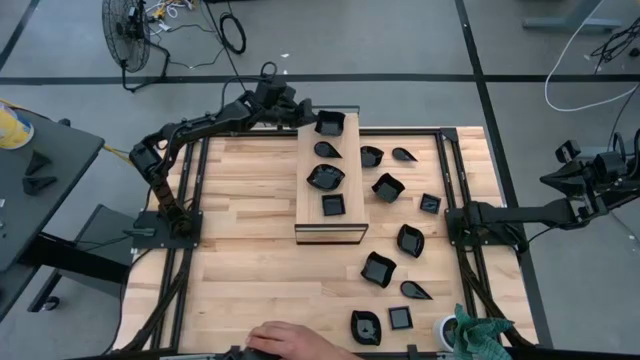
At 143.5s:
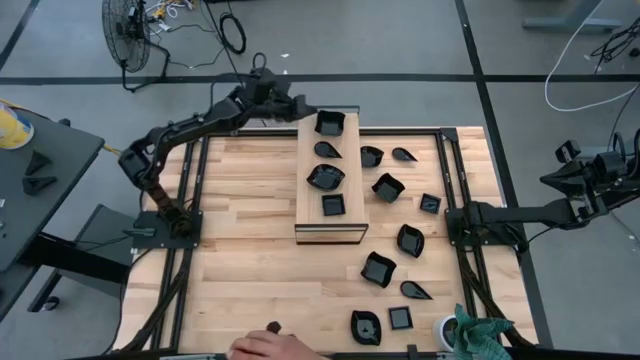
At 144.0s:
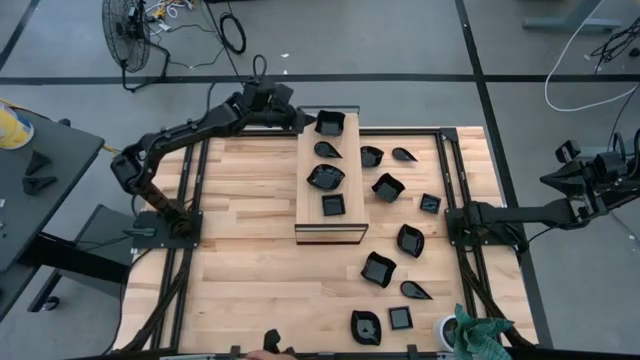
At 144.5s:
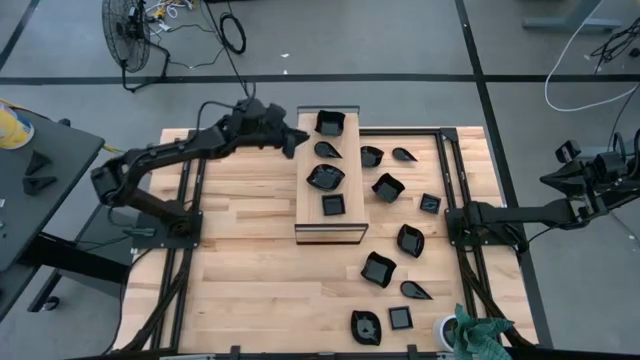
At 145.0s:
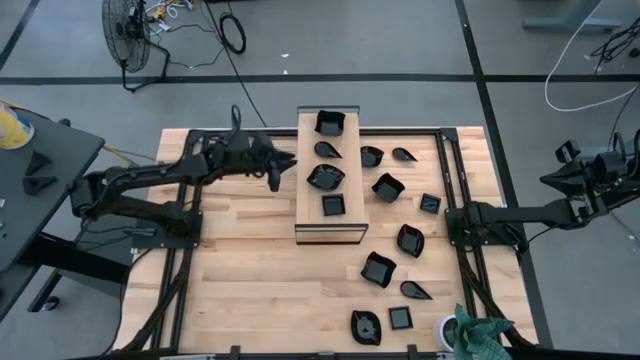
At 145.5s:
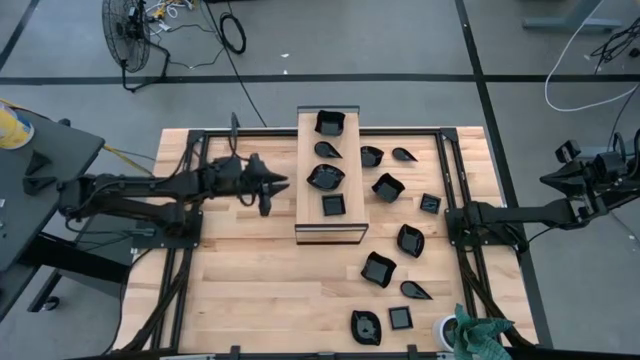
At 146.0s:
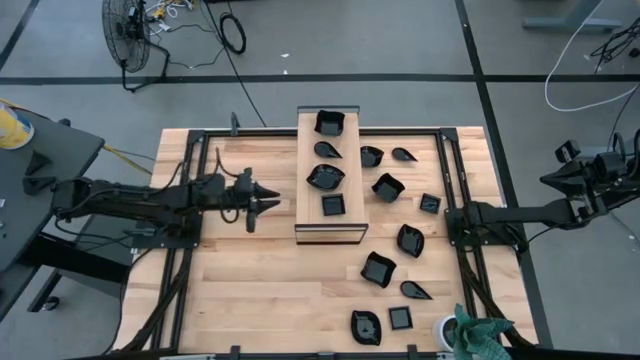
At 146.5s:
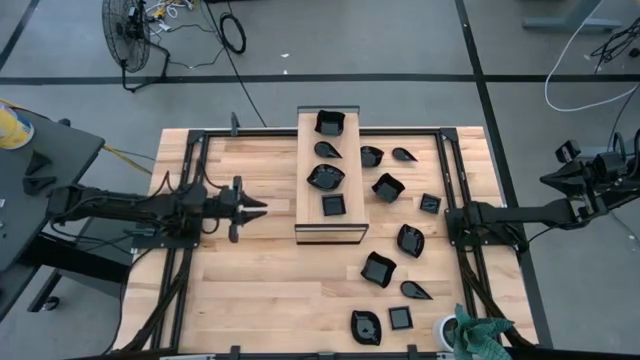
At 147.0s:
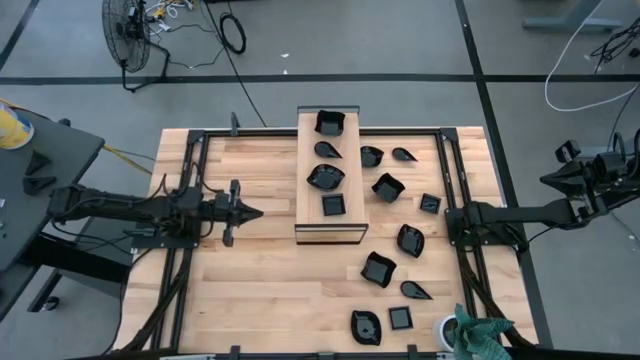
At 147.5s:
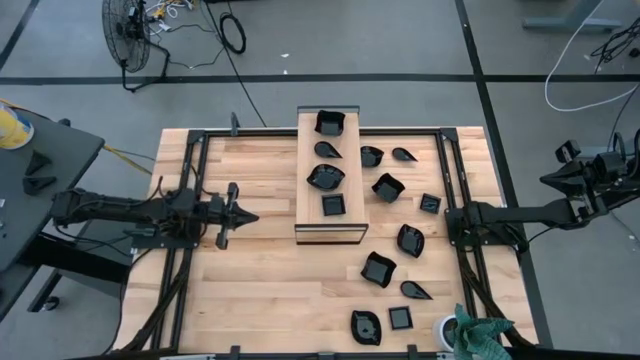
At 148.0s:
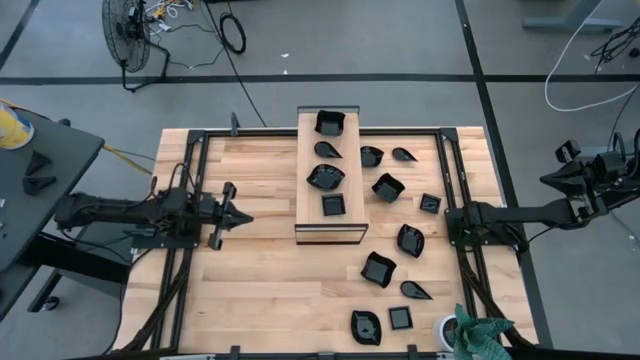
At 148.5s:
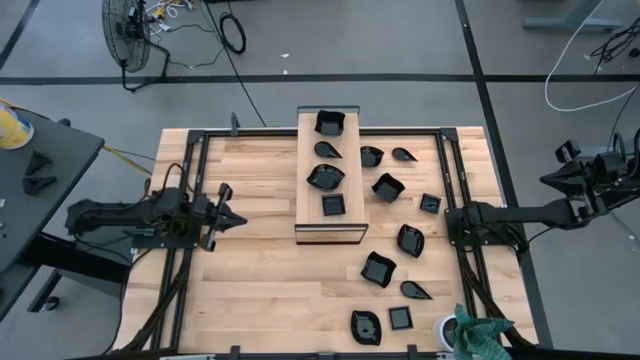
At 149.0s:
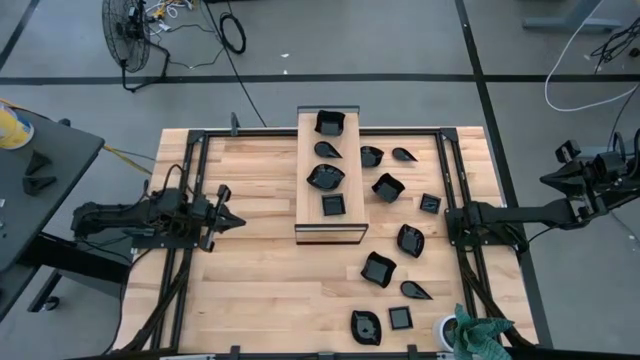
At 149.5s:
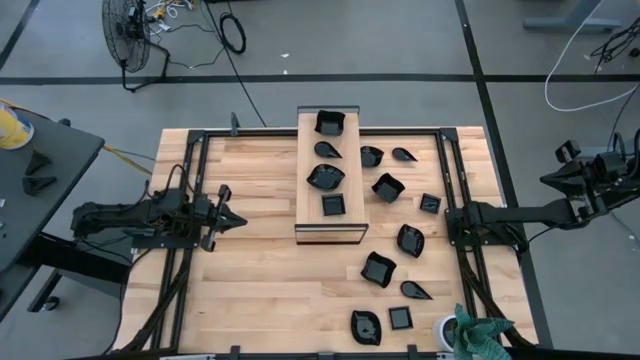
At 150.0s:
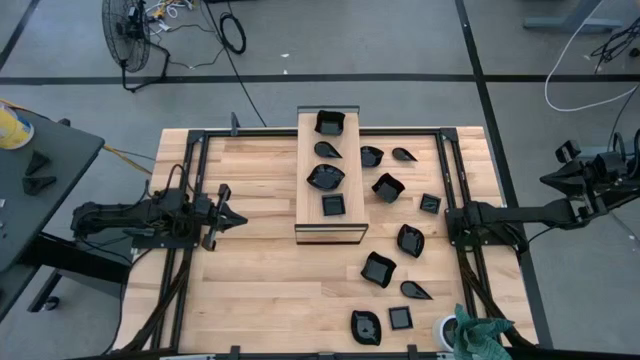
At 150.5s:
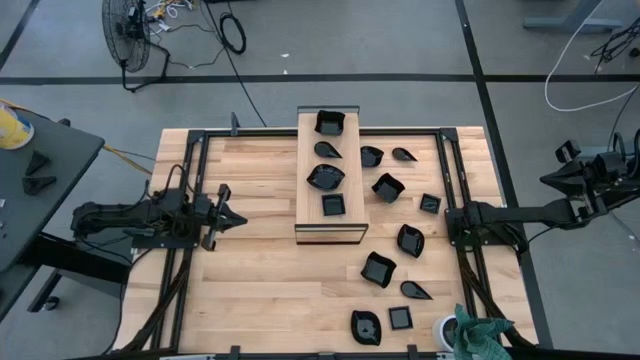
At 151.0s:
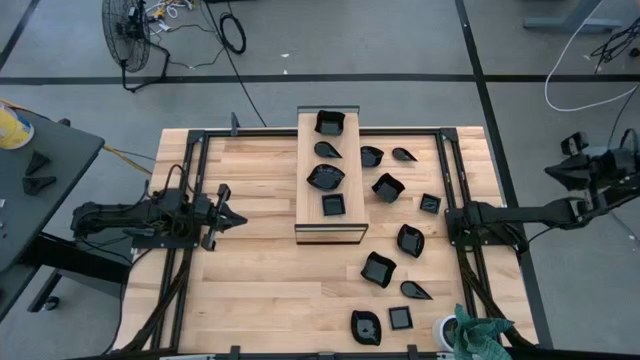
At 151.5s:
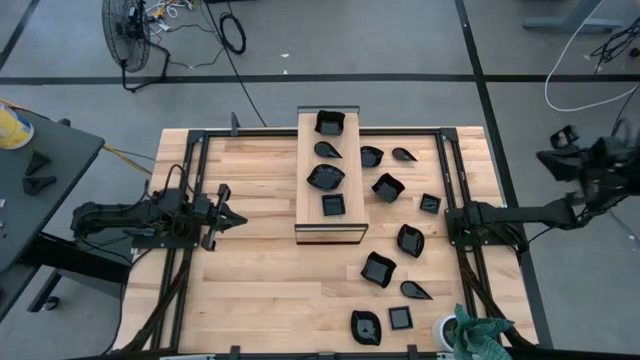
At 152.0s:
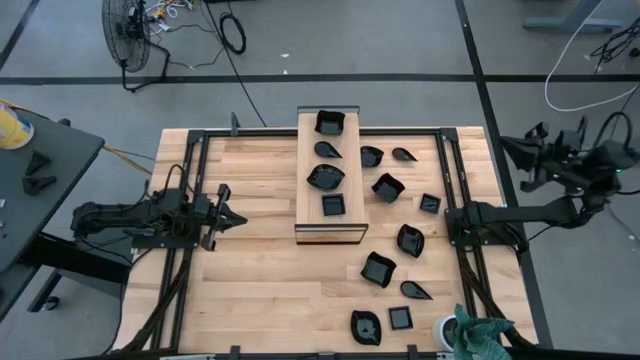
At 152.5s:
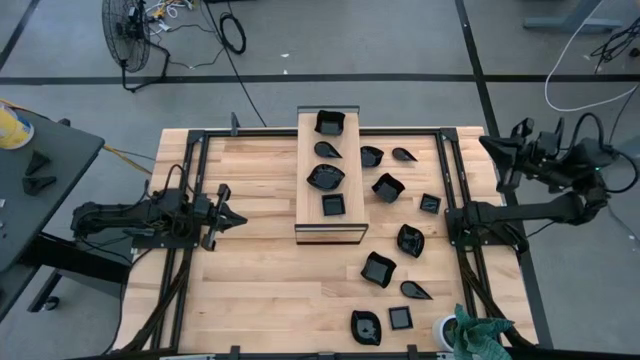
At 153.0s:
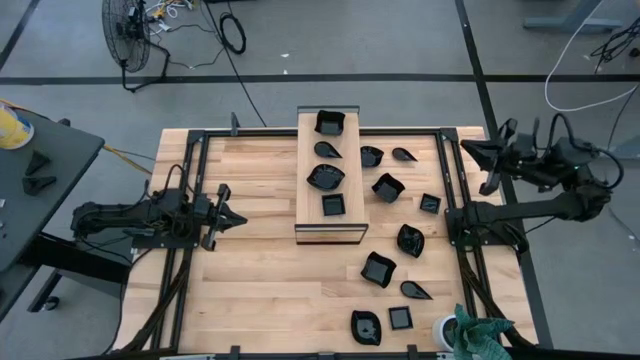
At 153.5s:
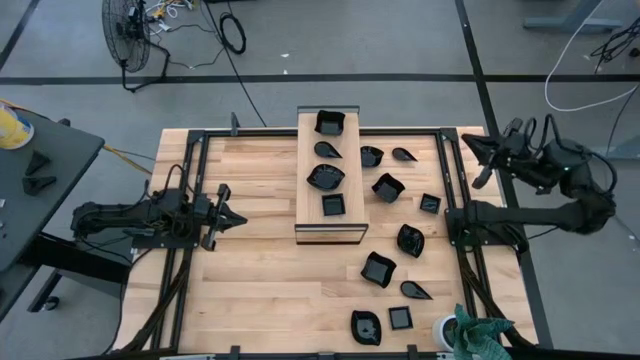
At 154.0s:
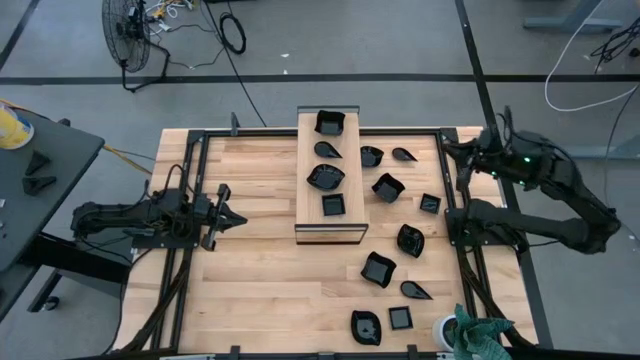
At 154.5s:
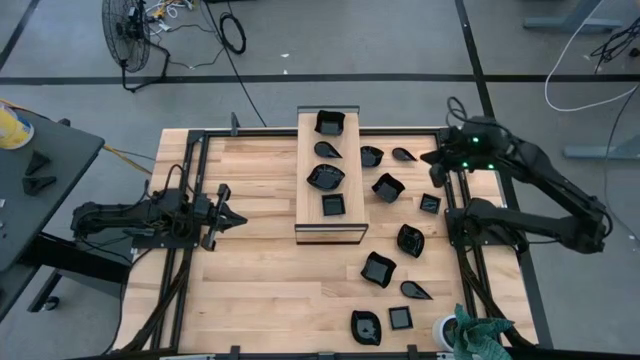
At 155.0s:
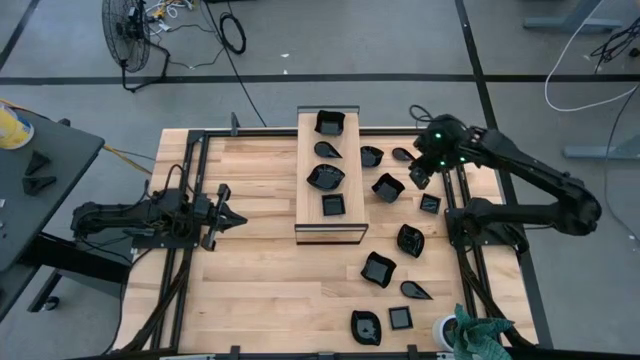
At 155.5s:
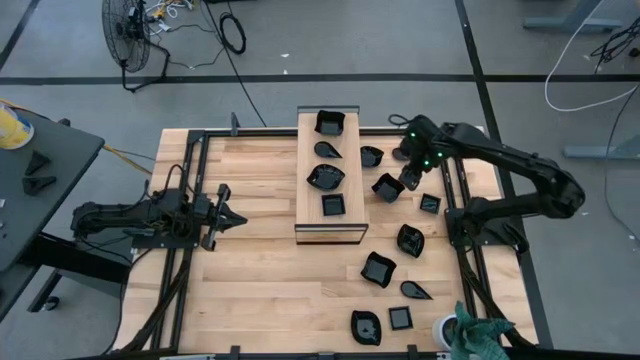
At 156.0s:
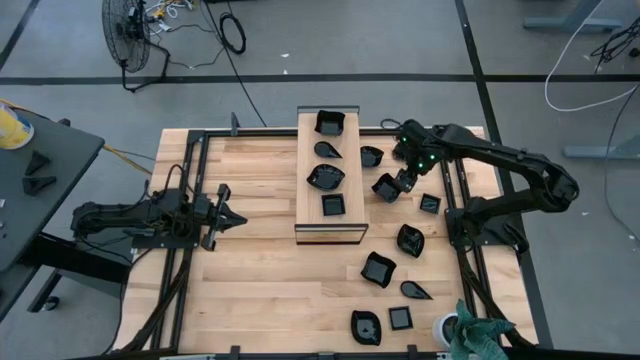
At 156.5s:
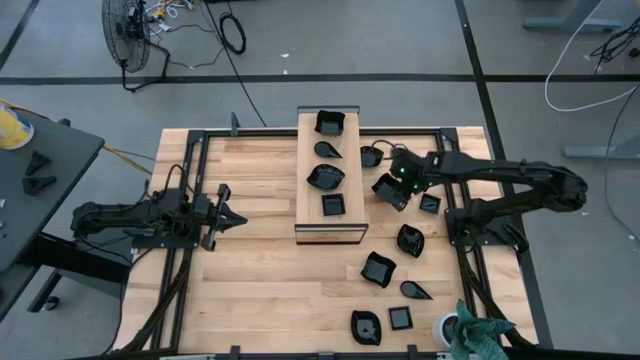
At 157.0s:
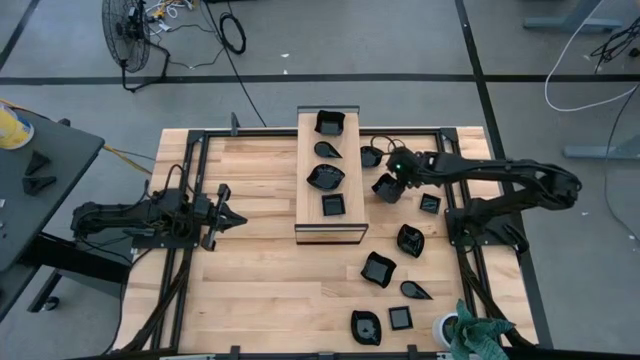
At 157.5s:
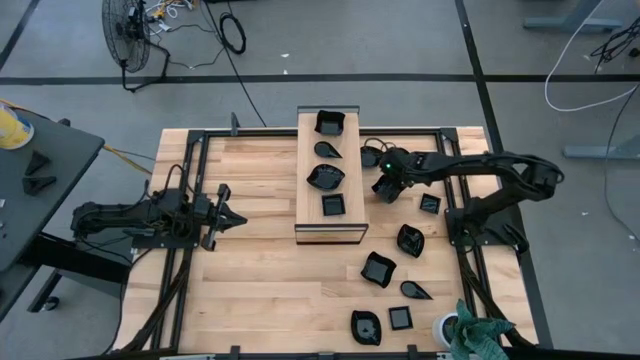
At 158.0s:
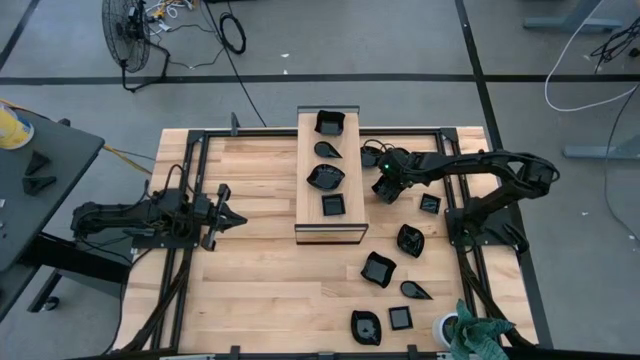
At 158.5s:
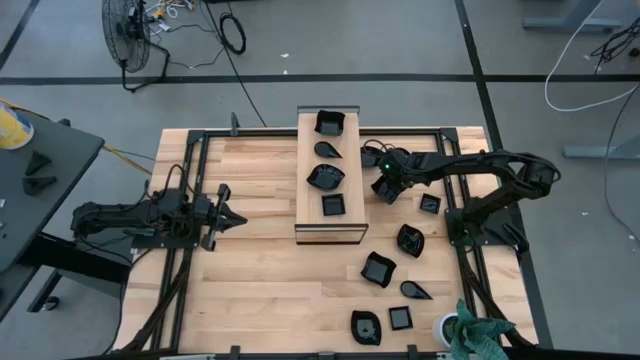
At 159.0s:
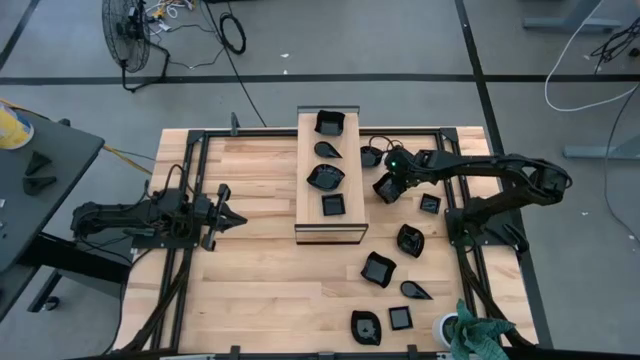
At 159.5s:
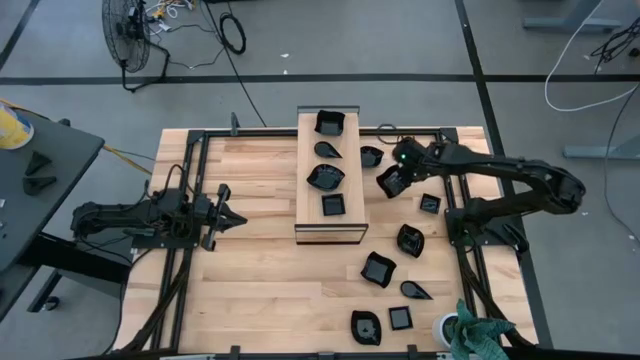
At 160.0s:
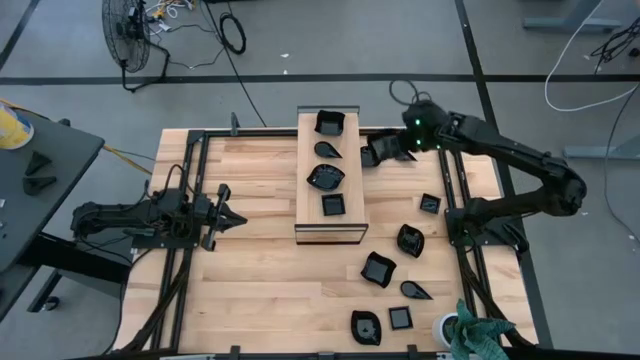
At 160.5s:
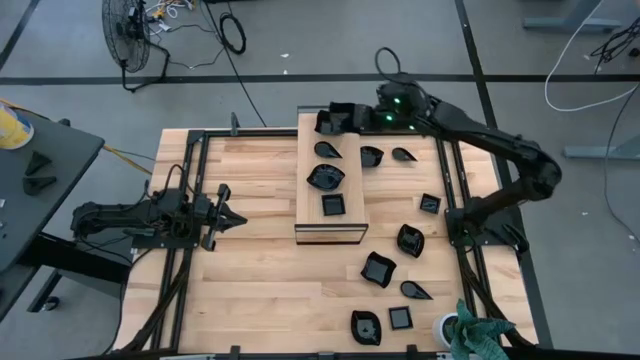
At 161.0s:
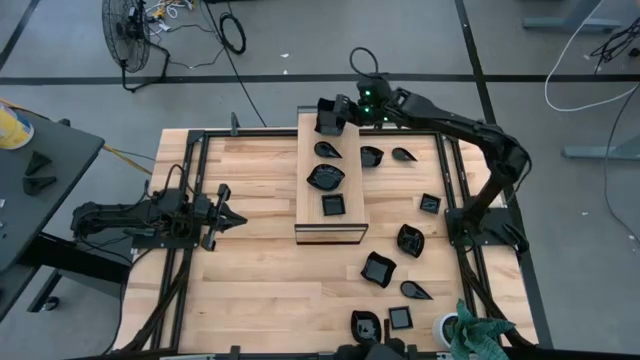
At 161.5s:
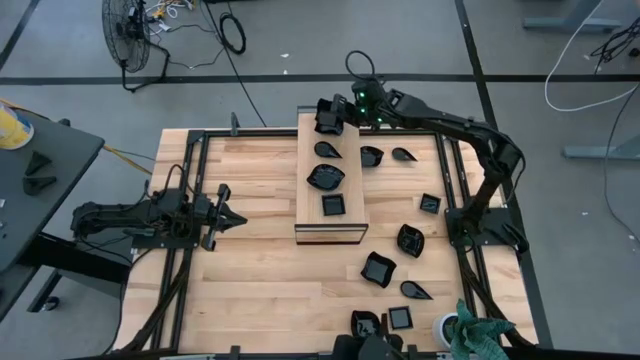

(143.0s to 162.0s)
Task: Pick & Place Mini shaped plates
Stack the distorted square plate on top of the distorted square plate on the shelf

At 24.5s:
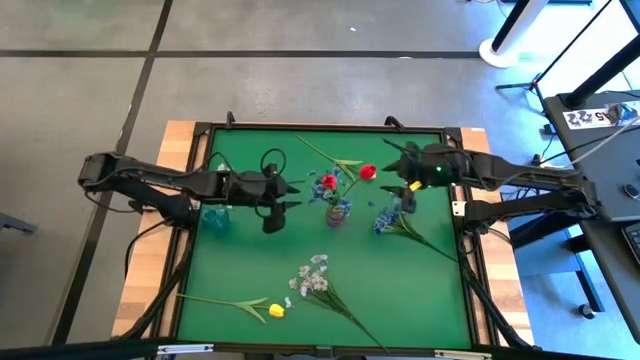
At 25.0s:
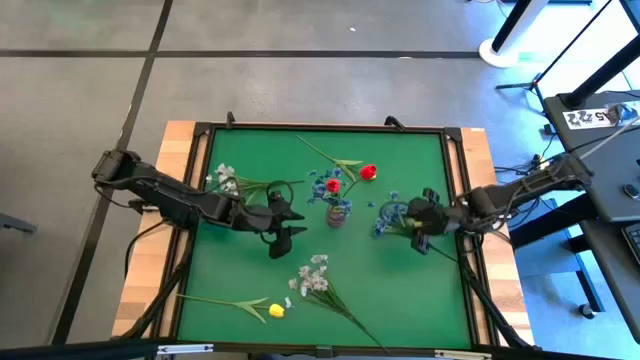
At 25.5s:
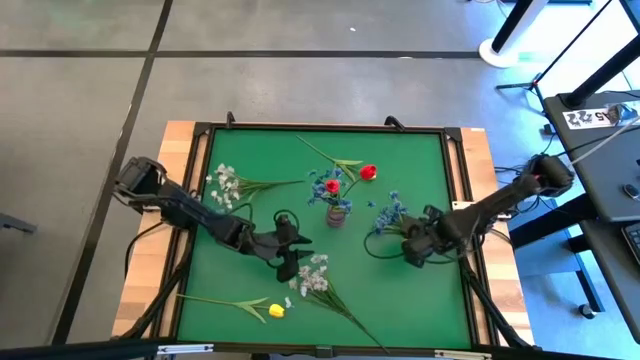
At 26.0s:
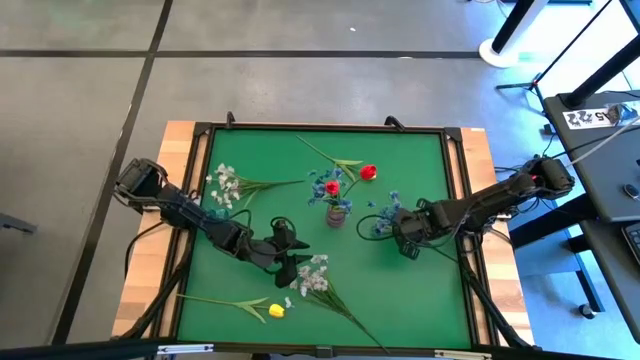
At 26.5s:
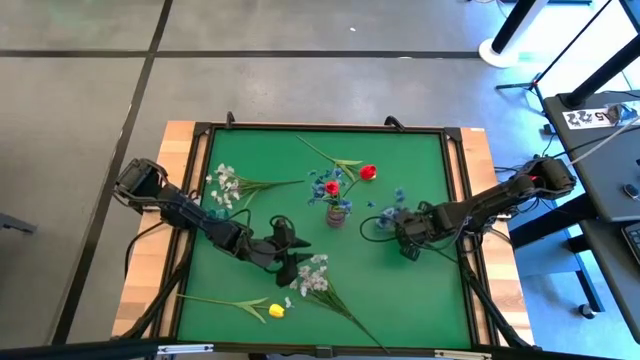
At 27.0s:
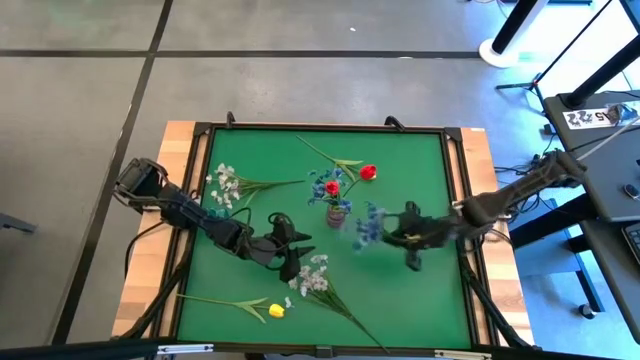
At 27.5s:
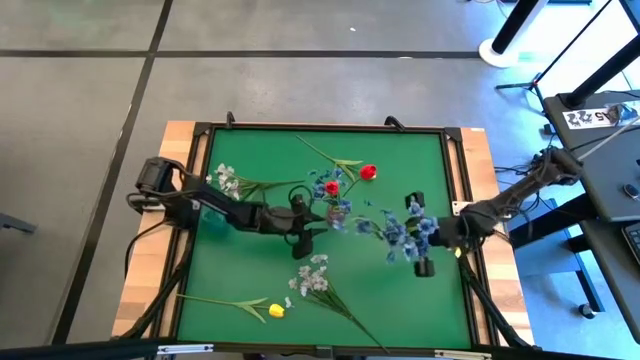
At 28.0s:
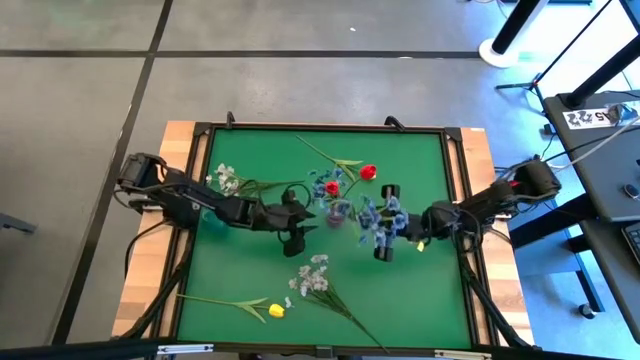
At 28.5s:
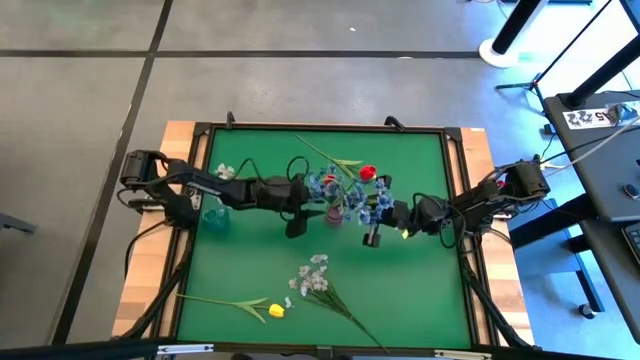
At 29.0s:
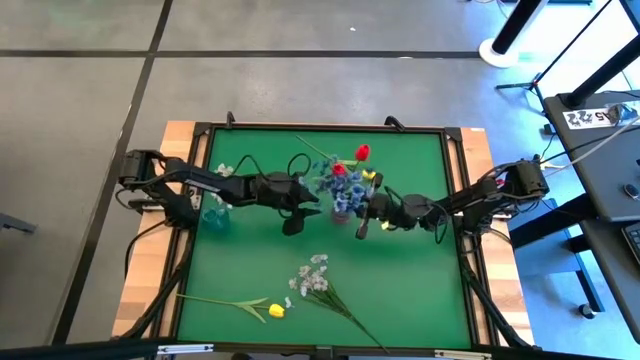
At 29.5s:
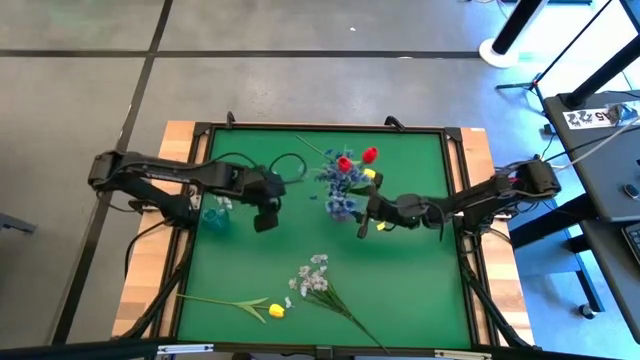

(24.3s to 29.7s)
Task: Sort flowers into vase by color
Put the blue flowers into the purple vase
